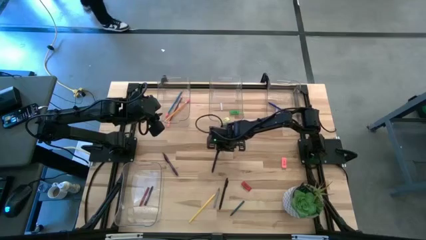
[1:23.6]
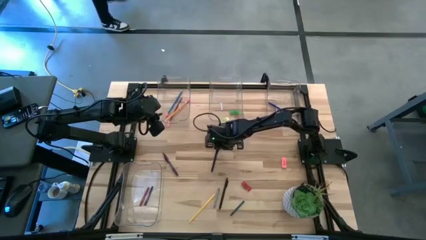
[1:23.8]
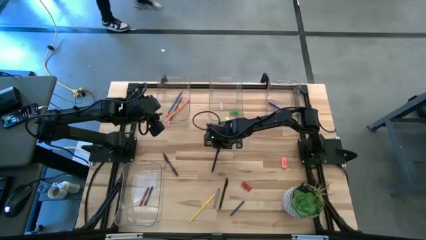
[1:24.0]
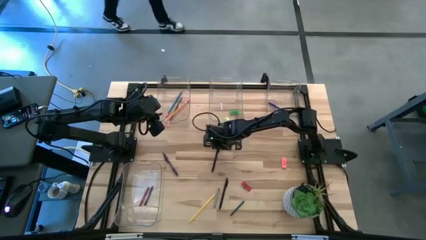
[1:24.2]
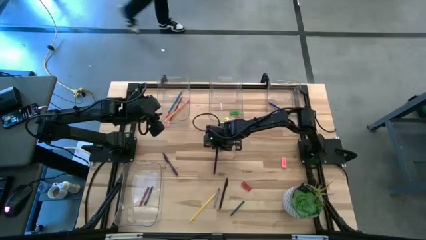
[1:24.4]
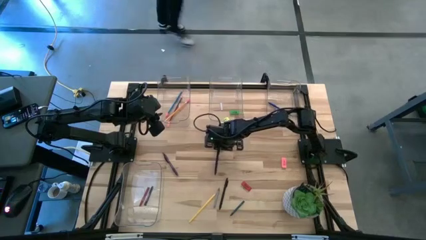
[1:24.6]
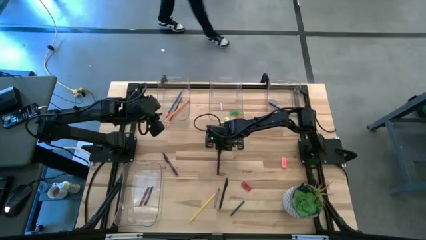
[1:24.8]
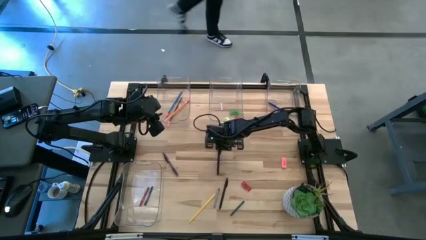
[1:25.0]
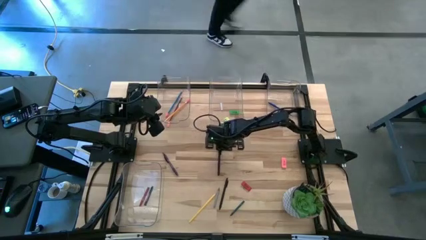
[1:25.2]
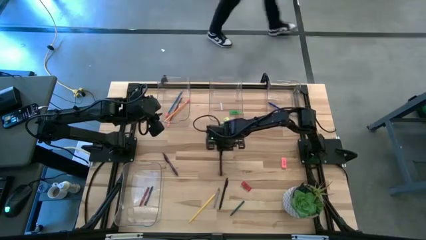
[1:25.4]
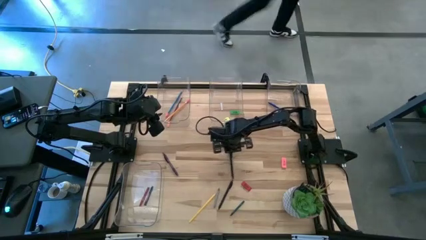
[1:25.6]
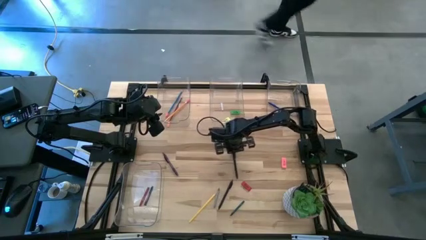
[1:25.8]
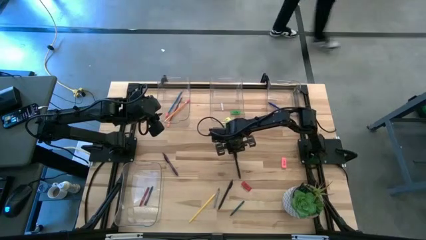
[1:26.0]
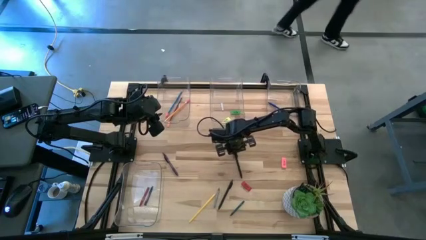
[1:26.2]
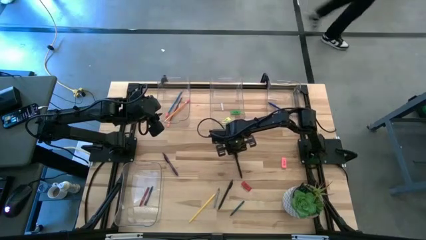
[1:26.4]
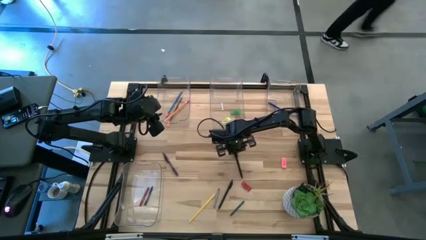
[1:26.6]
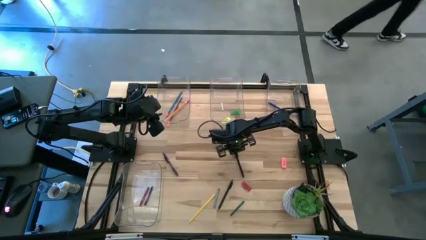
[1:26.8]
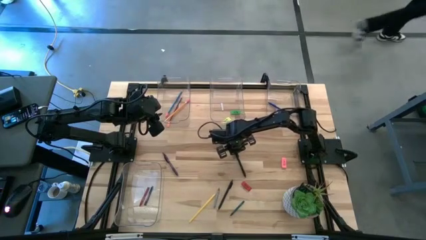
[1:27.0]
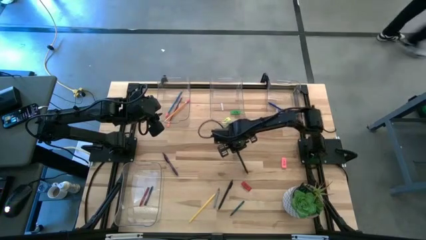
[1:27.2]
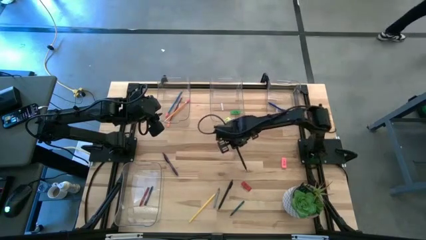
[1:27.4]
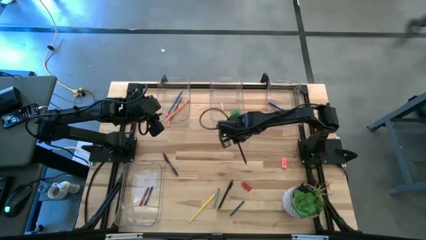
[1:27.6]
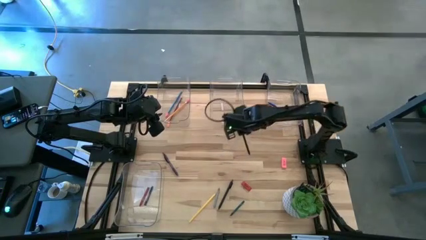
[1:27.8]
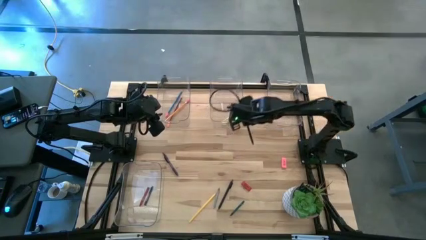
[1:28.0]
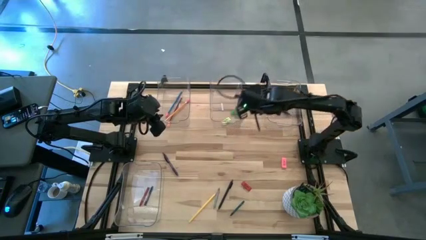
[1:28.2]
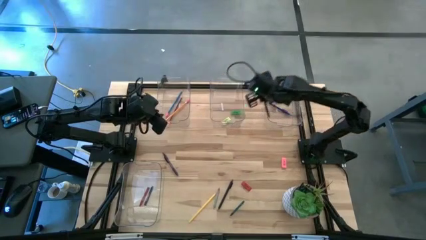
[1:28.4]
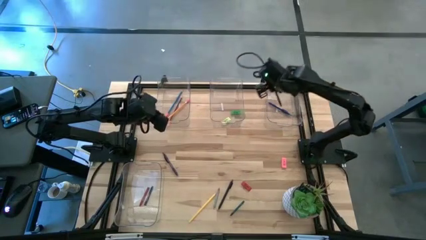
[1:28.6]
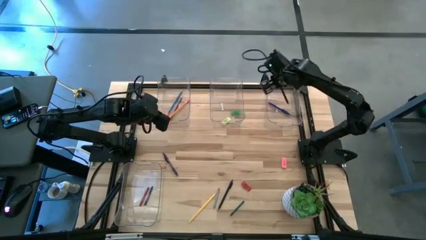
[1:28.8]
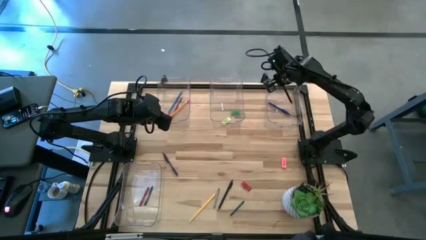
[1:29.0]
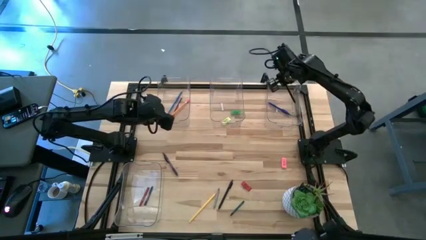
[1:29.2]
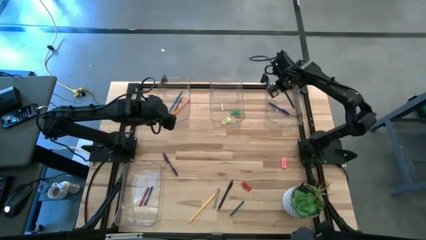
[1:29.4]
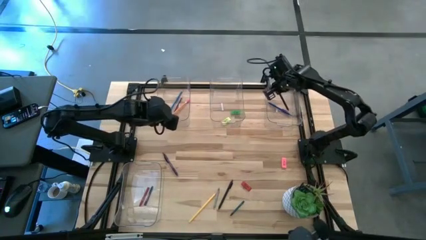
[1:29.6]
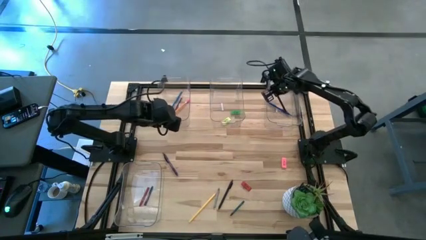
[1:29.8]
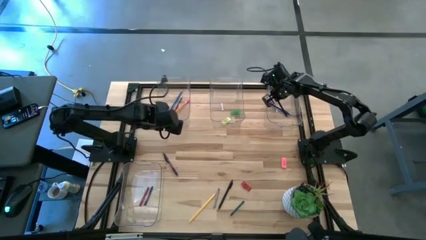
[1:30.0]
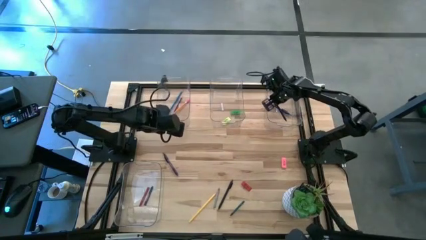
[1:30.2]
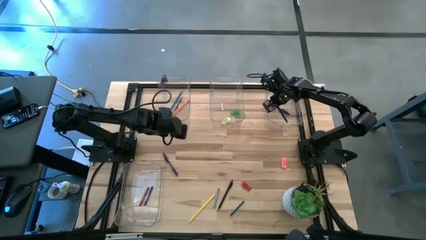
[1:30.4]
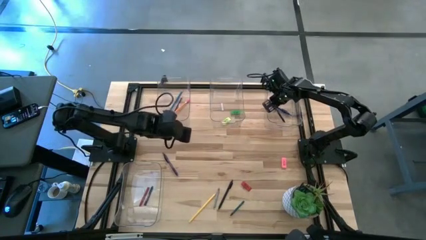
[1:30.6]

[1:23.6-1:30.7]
Task: Sort crayons/erasers/pens/pencils in bins
Put the top black pen into the top right transparent bin

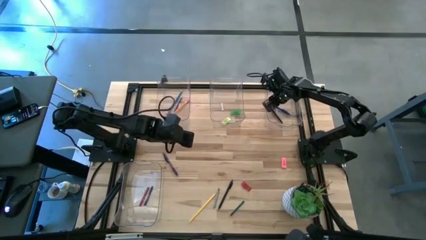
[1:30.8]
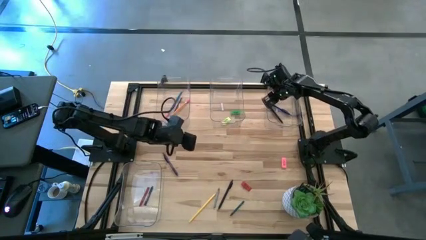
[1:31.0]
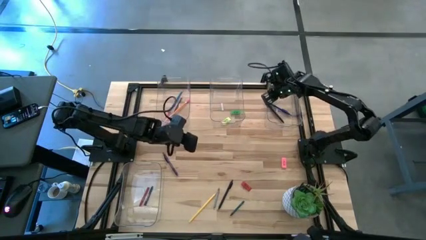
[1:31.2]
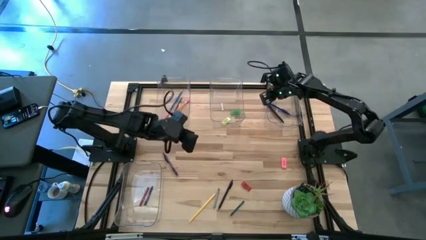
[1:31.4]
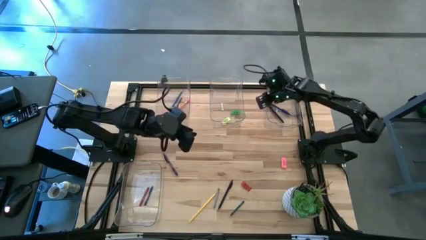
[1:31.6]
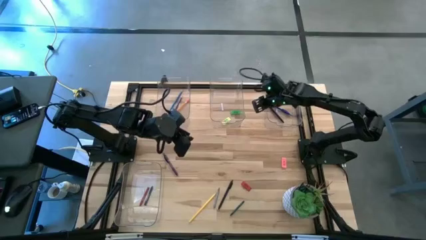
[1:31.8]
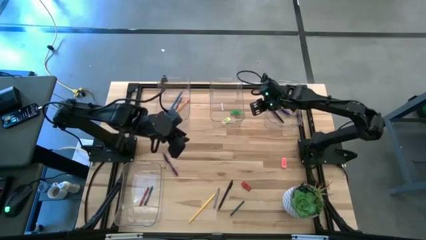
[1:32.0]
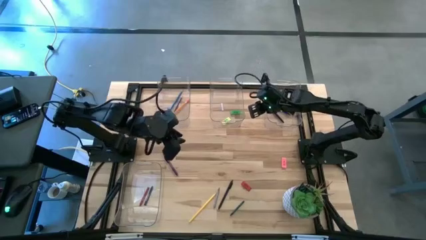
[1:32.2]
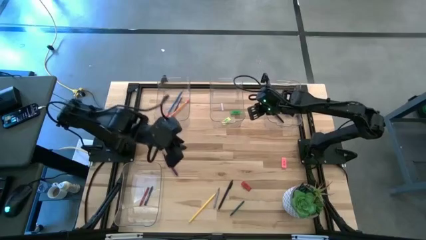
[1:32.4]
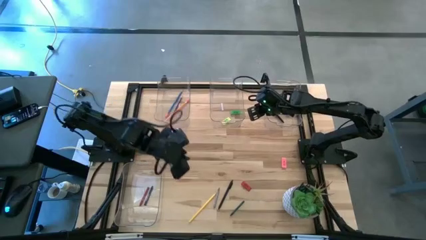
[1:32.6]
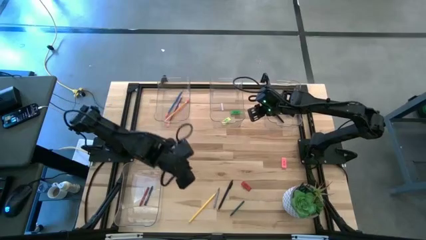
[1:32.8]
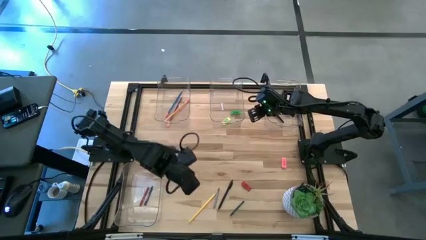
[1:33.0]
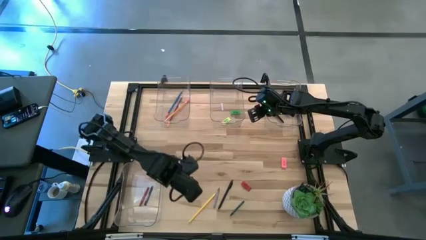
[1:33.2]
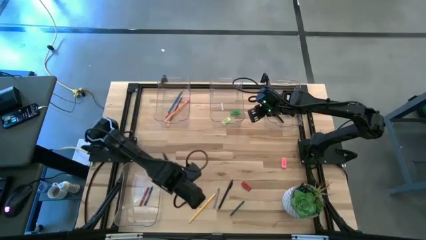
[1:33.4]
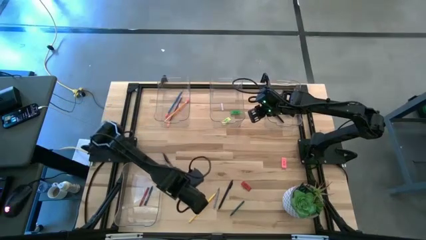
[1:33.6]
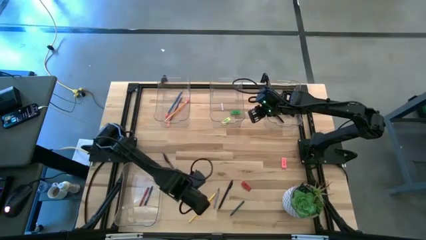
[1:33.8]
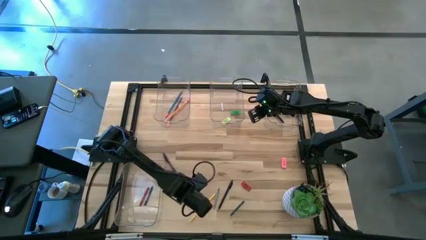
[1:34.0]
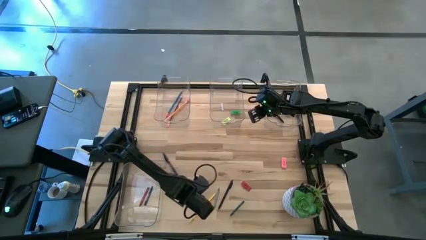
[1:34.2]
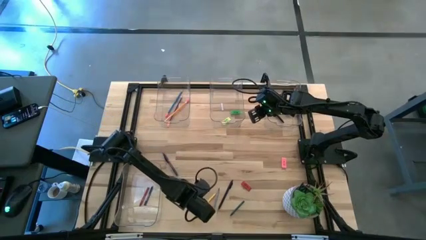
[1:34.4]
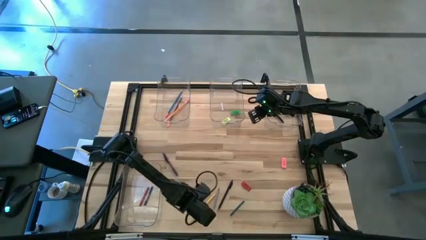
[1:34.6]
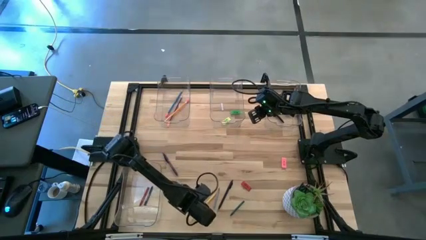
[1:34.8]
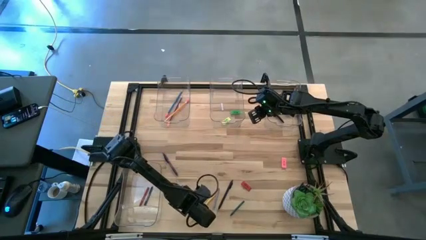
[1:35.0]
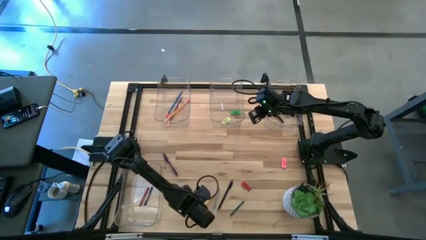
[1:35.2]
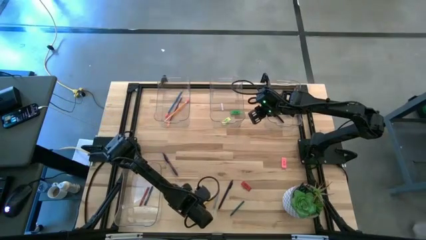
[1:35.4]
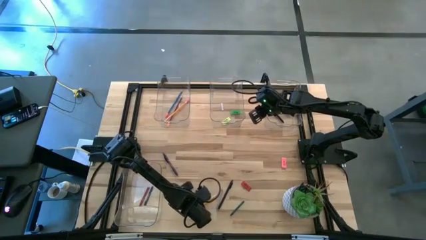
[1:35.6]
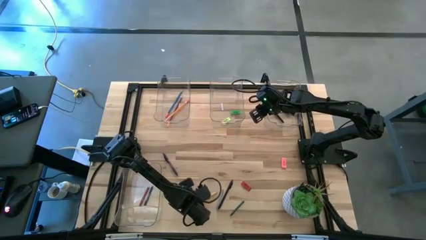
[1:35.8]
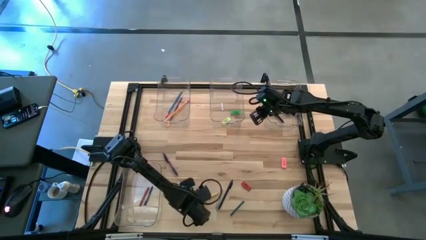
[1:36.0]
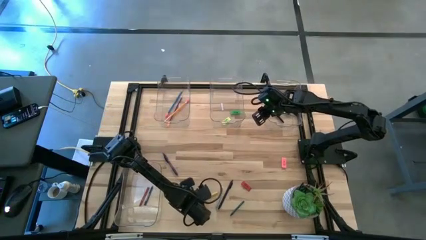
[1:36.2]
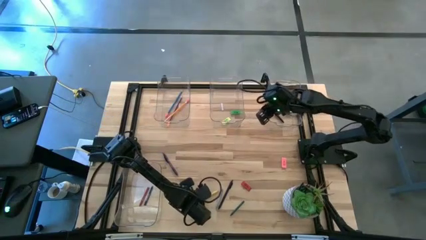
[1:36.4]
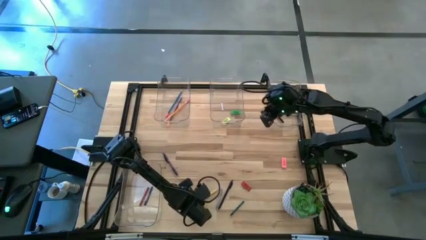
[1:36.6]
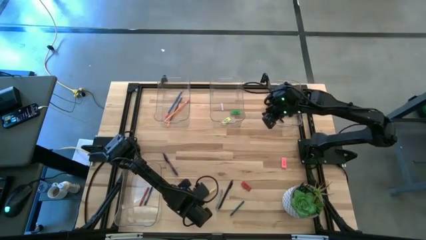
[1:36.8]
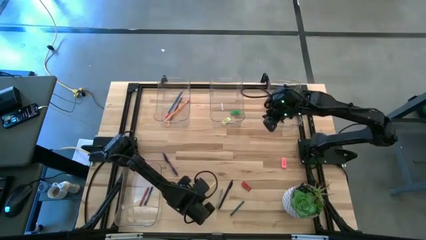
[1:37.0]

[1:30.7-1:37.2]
Put the yellow pencil into the top left transparent bin

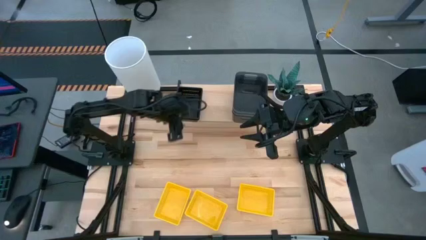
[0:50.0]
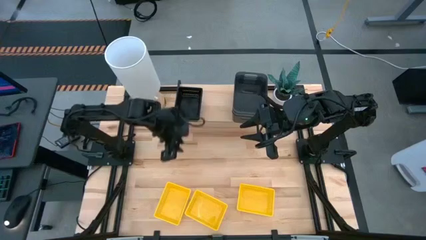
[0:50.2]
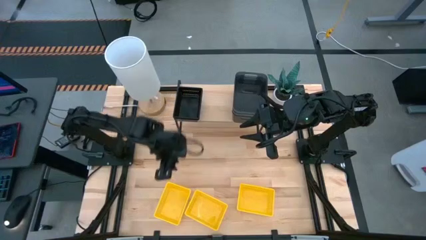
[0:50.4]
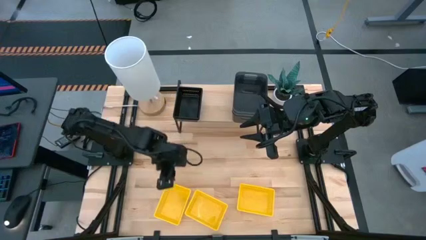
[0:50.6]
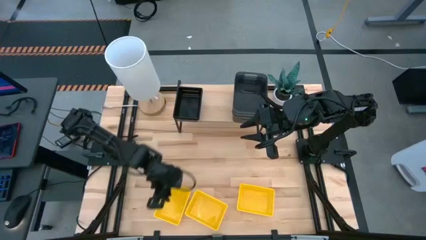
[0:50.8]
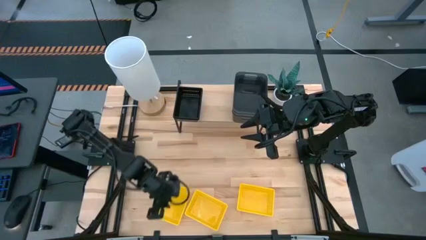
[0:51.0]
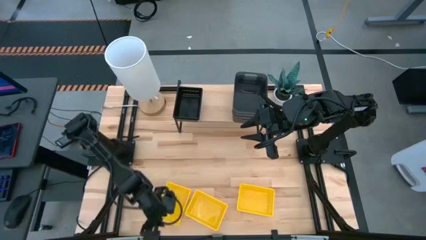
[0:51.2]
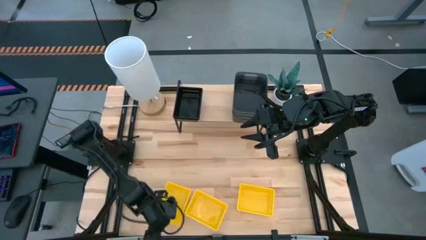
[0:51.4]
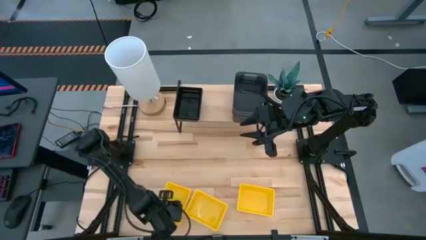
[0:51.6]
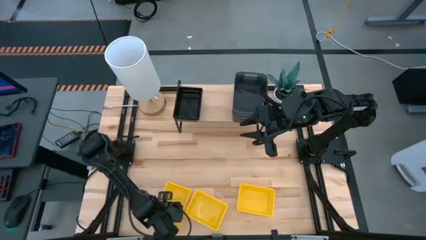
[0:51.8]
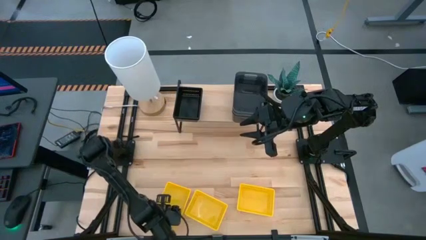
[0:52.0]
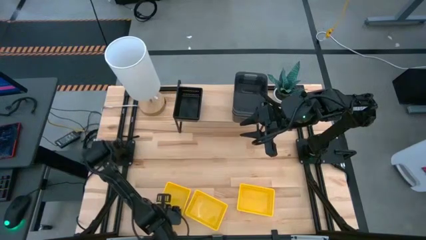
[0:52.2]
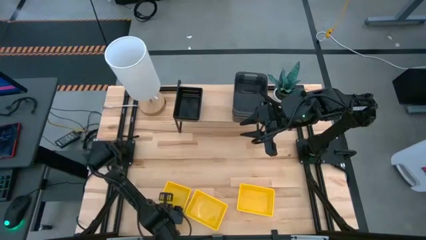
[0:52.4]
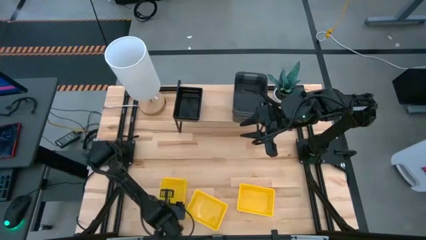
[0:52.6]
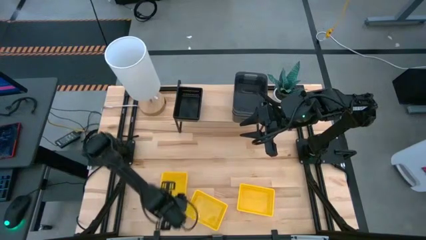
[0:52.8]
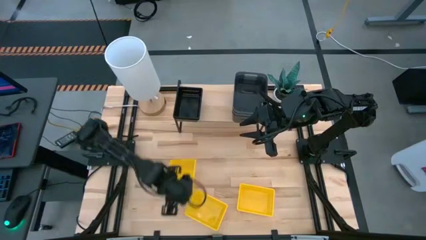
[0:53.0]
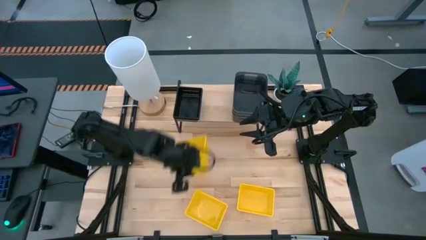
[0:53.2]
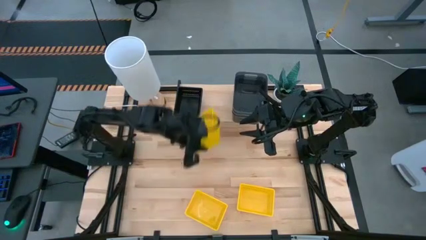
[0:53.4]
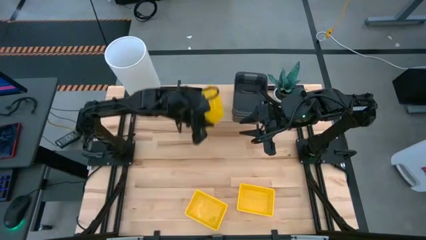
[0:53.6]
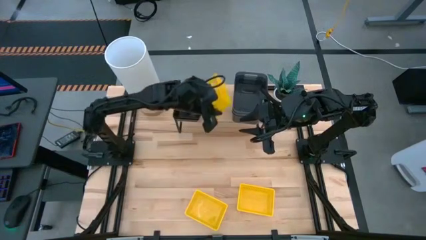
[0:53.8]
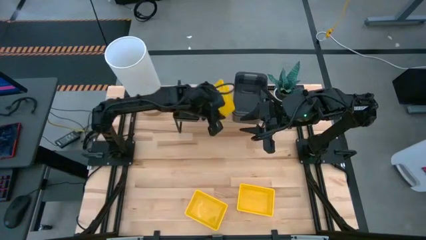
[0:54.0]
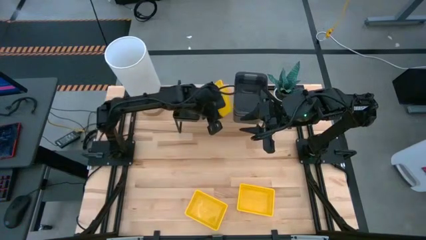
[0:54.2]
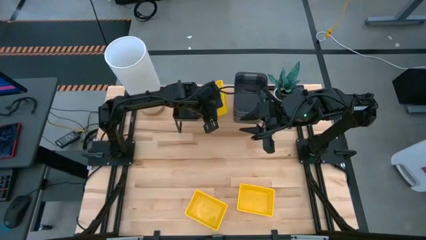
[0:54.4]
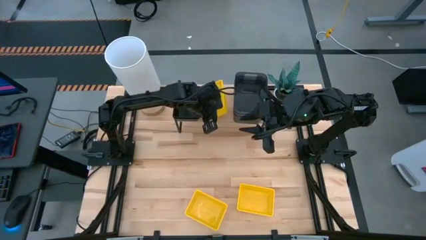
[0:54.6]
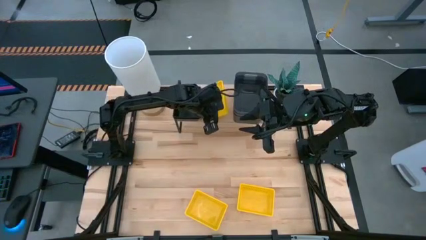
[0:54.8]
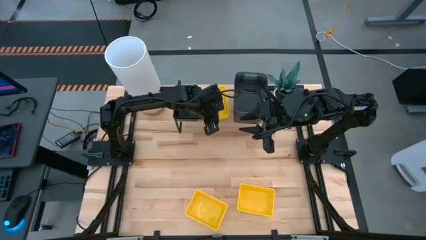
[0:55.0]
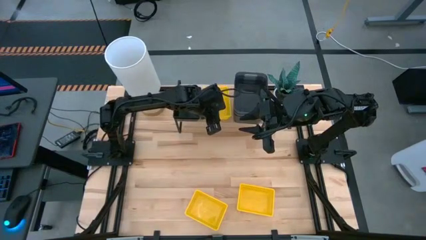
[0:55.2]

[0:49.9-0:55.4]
Task: Stack baskets on shelf by color
Put the left yellow basket on the shelf
